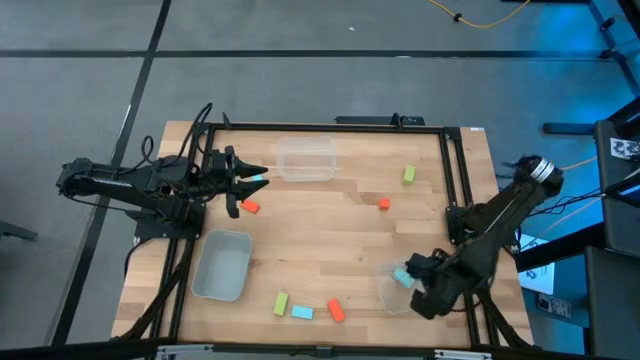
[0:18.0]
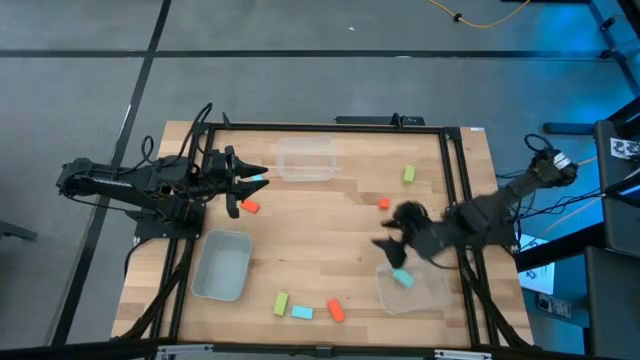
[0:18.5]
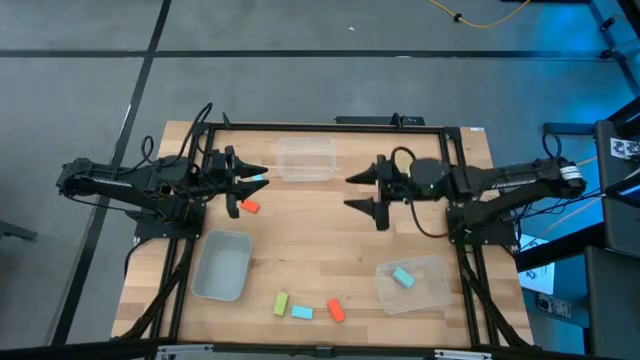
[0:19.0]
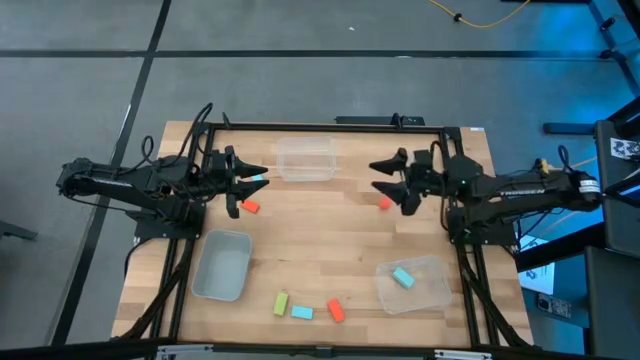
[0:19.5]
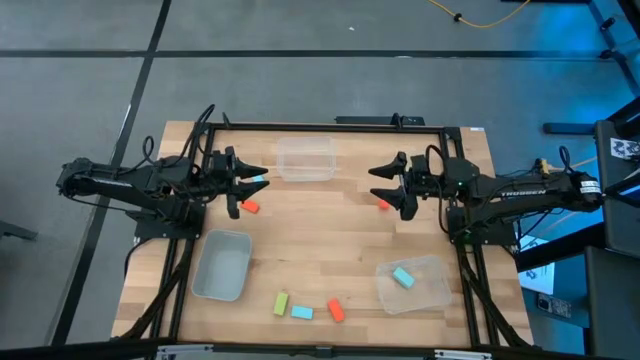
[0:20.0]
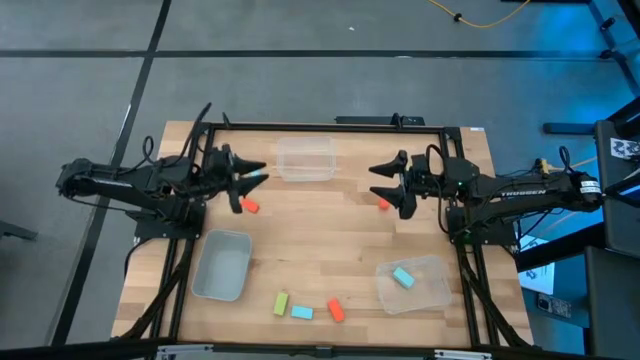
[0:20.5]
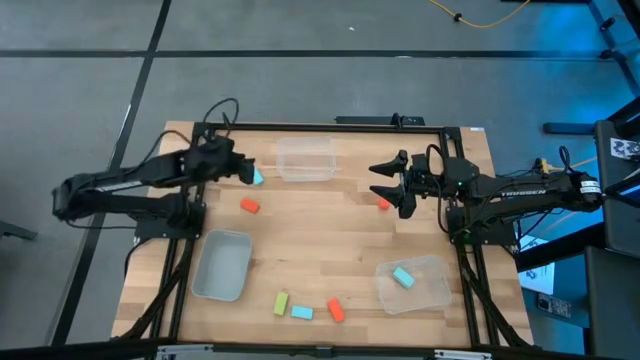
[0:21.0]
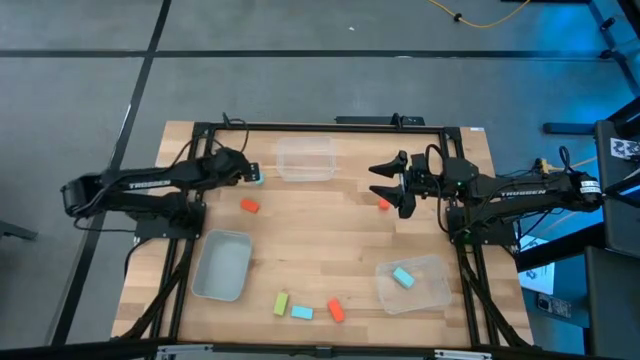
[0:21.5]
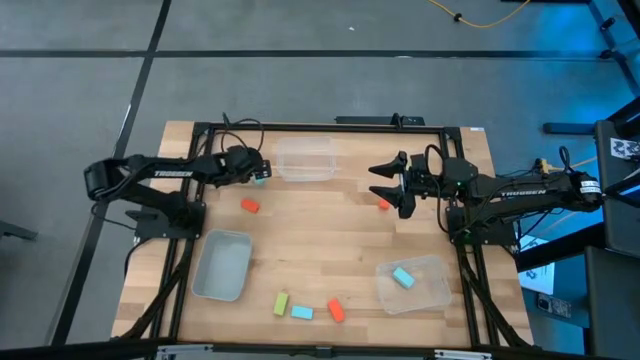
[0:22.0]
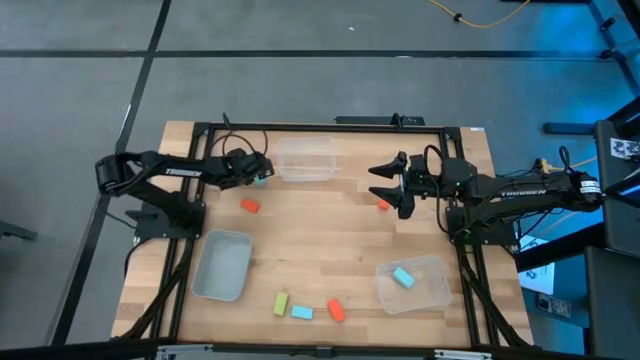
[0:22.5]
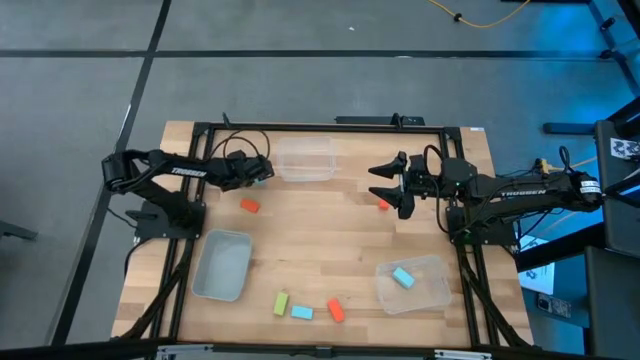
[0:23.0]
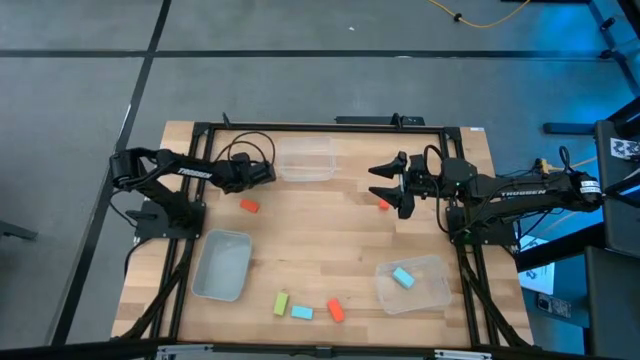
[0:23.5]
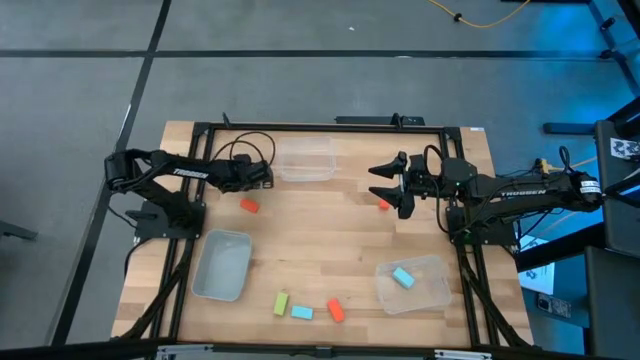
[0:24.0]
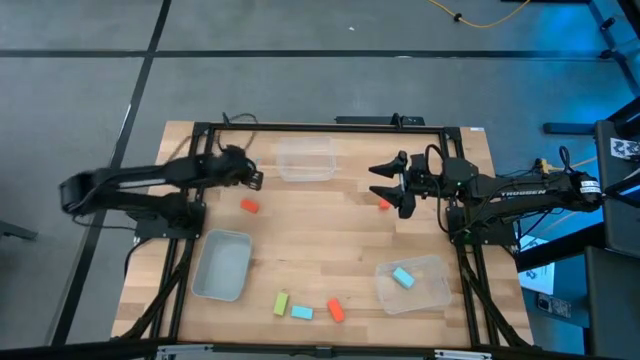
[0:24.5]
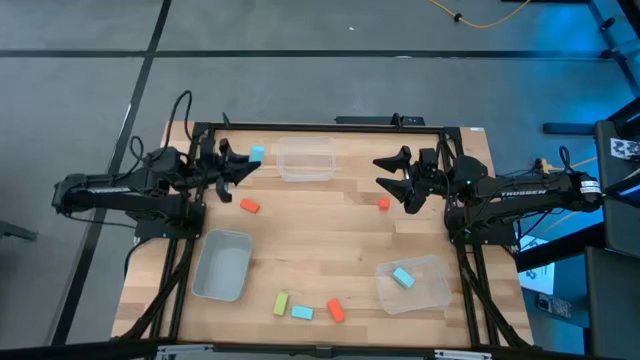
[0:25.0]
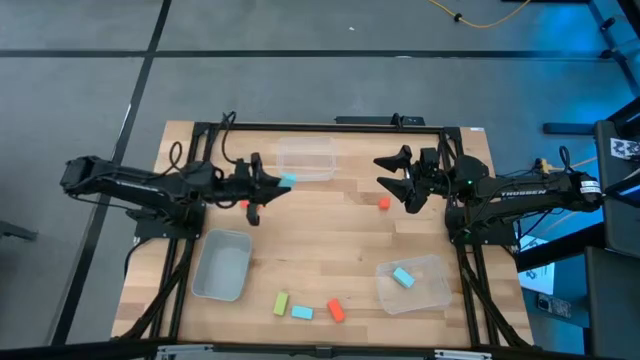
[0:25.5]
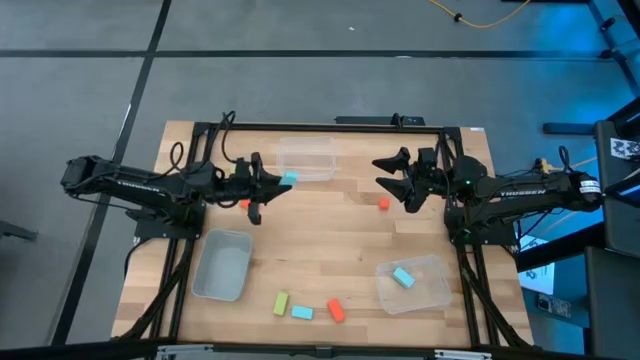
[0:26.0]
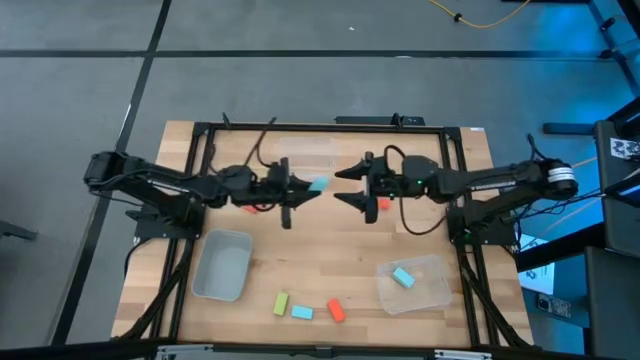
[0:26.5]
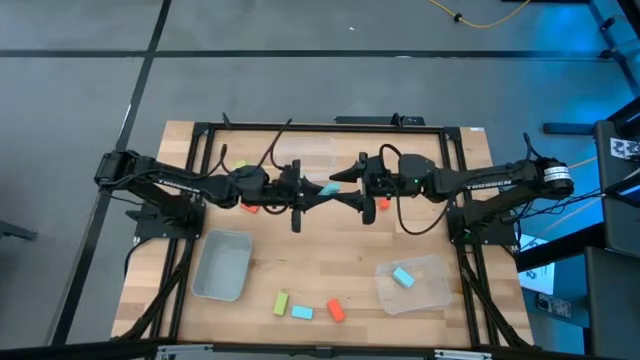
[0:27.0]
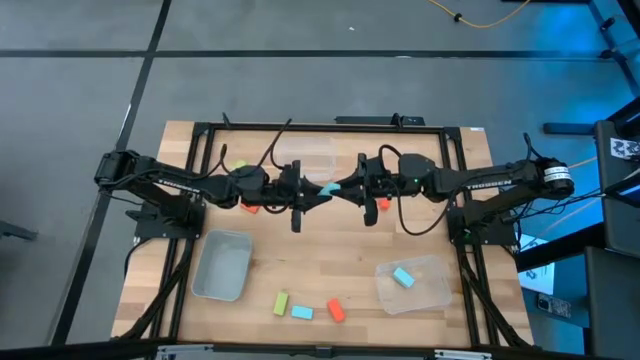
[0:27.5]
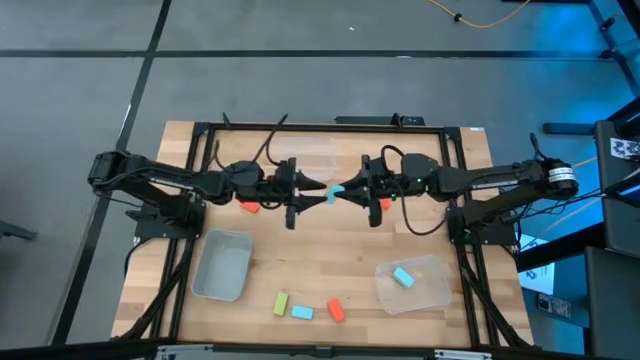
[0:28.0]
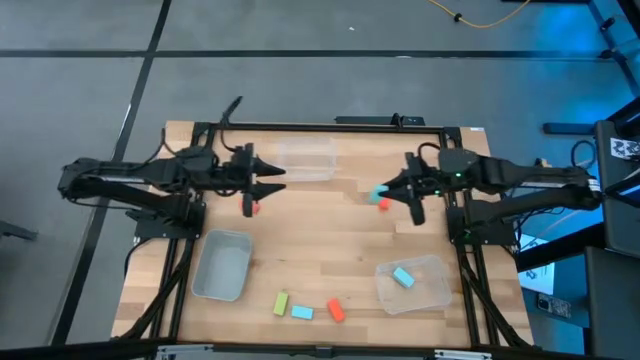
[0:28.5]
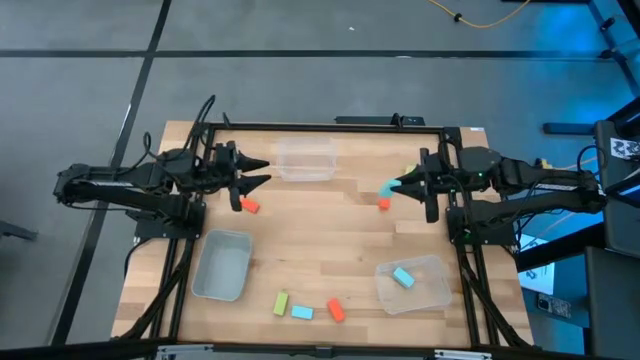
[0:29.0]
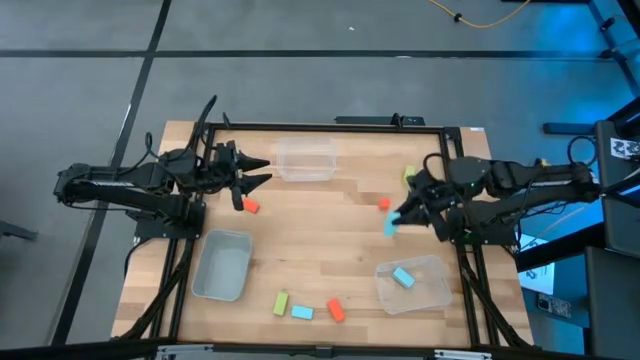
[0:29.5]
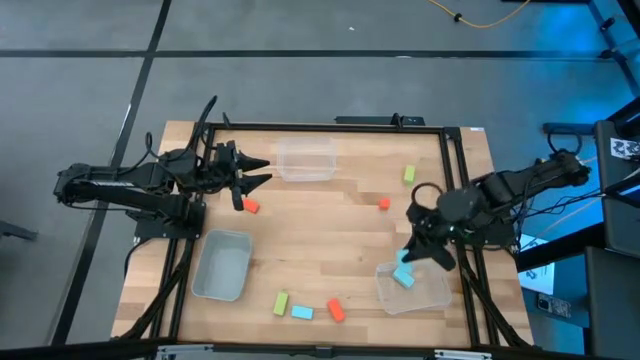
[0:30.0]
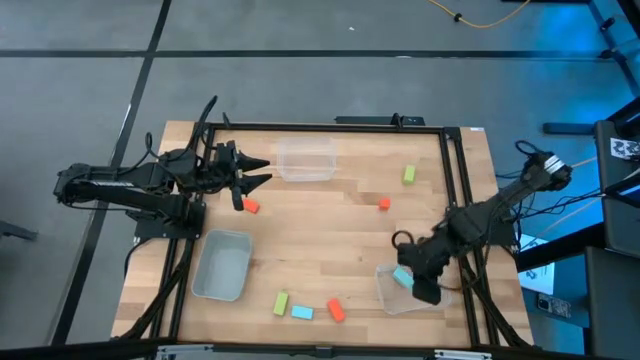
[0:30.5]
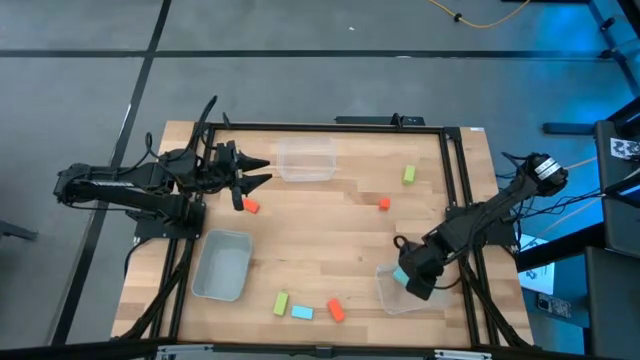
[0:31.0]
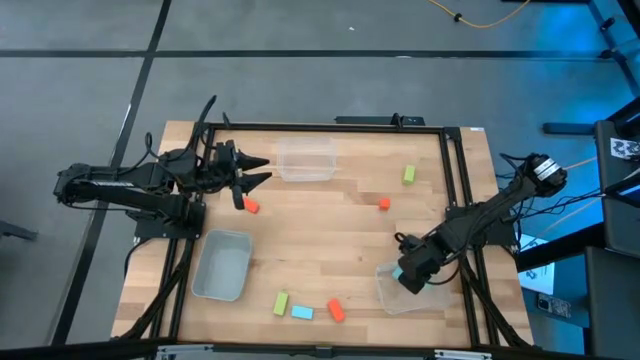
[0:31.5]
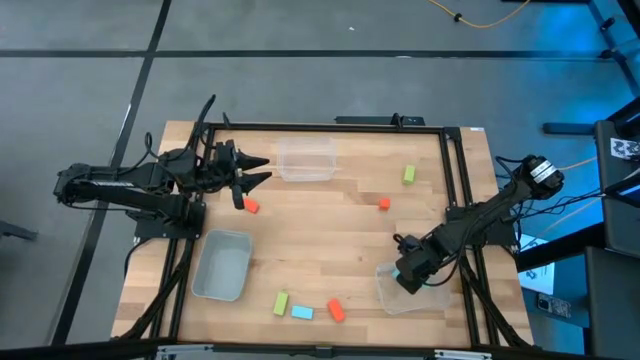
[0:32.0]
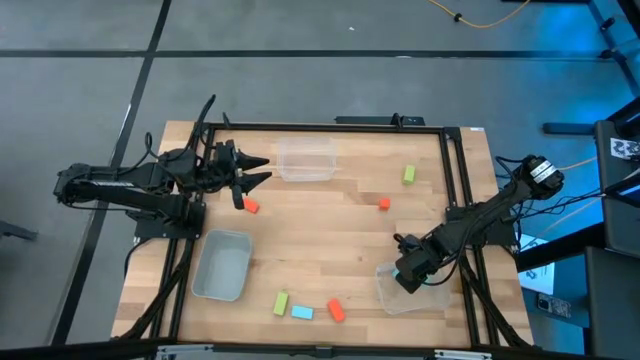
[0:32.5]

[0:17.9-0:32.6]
Task: Sort & place blocks by color
Put the top light blue half pillar block into the bottom right transparent bin

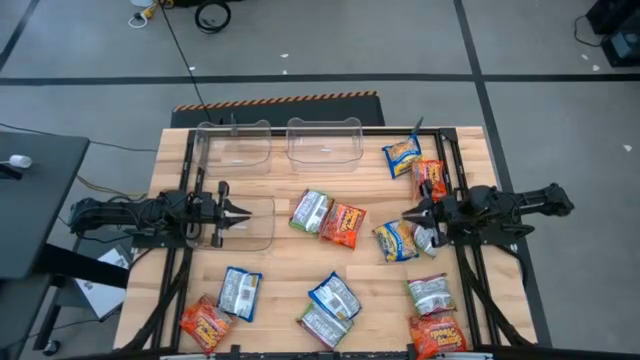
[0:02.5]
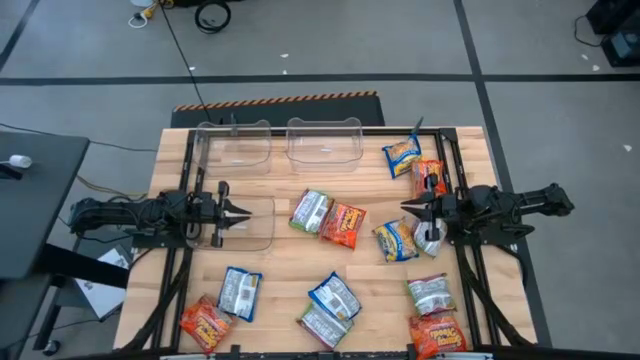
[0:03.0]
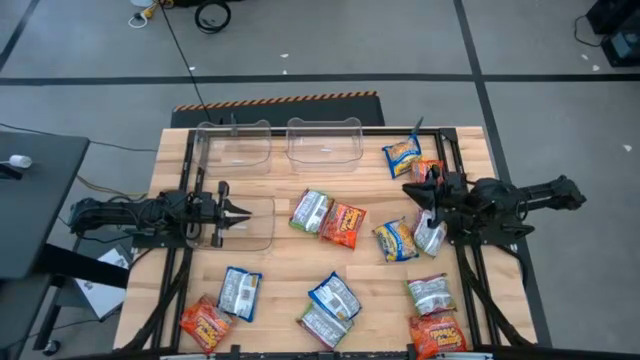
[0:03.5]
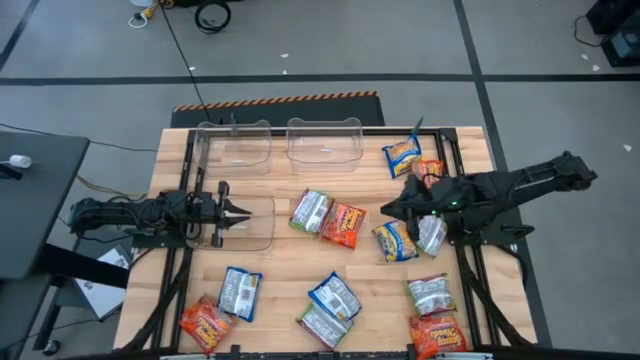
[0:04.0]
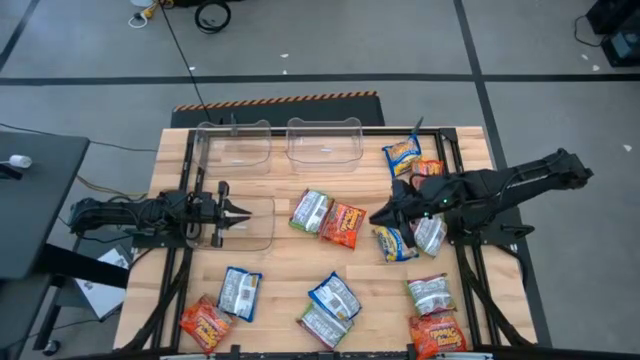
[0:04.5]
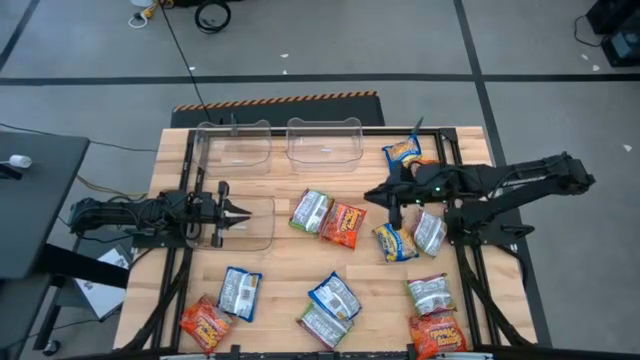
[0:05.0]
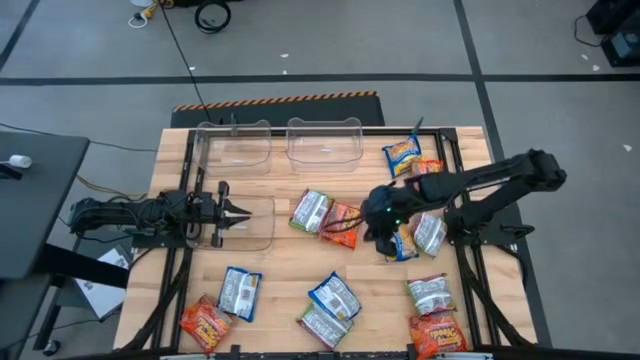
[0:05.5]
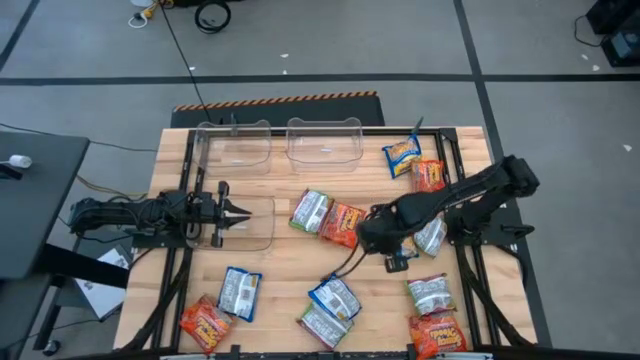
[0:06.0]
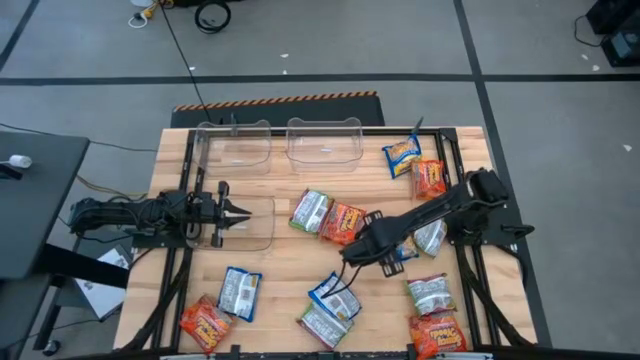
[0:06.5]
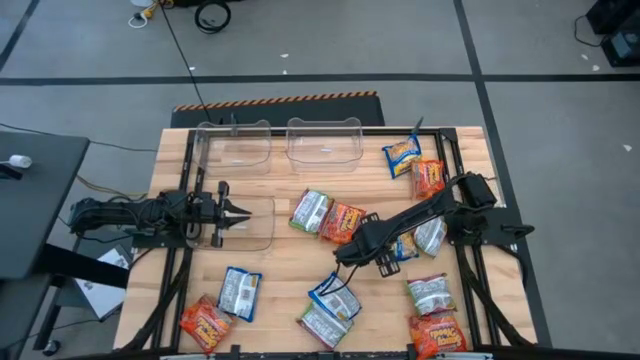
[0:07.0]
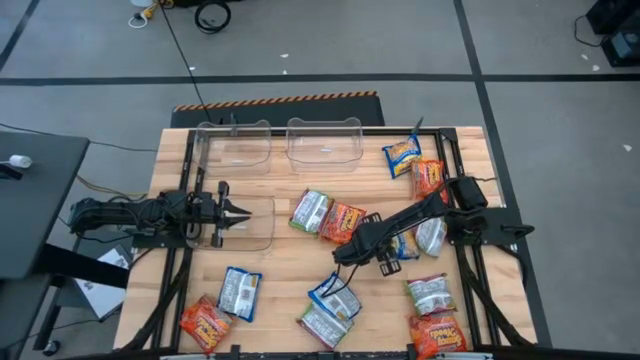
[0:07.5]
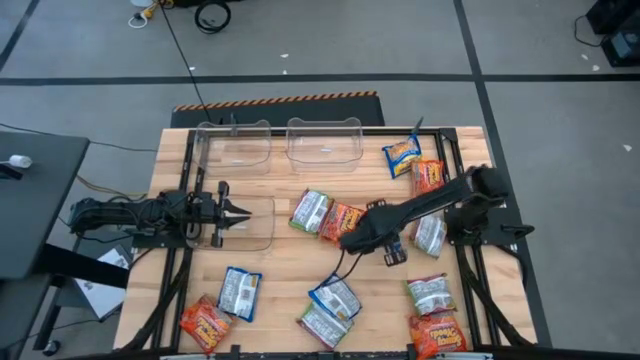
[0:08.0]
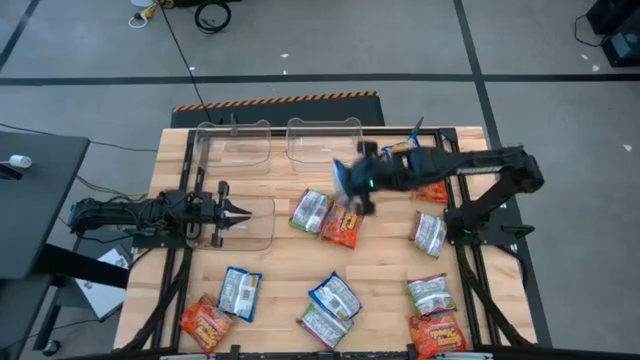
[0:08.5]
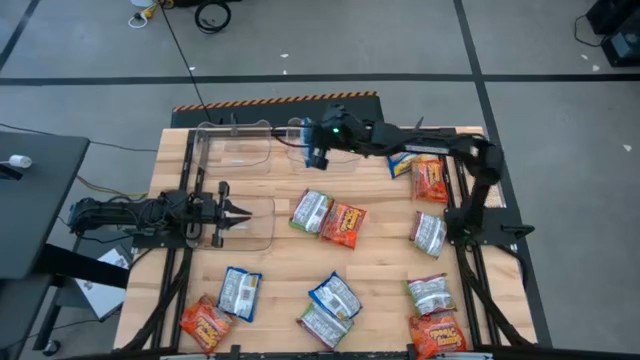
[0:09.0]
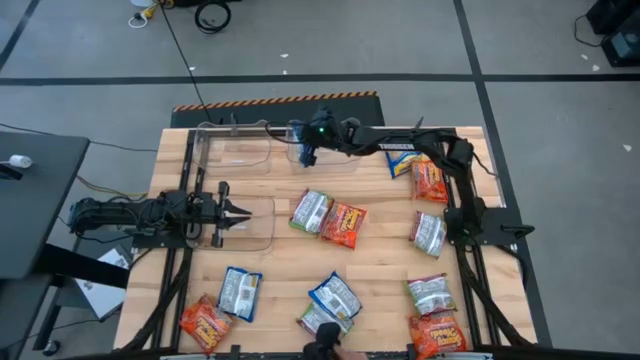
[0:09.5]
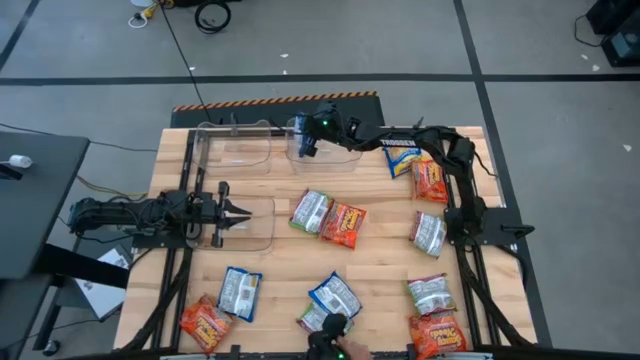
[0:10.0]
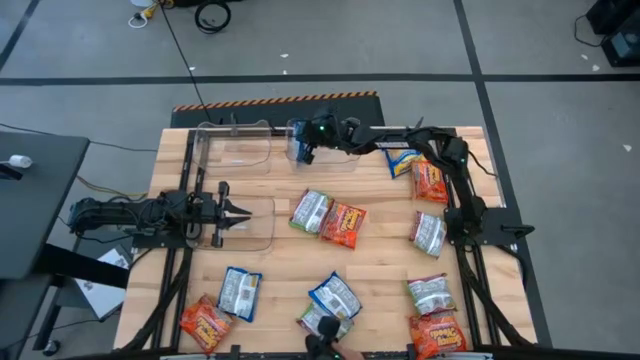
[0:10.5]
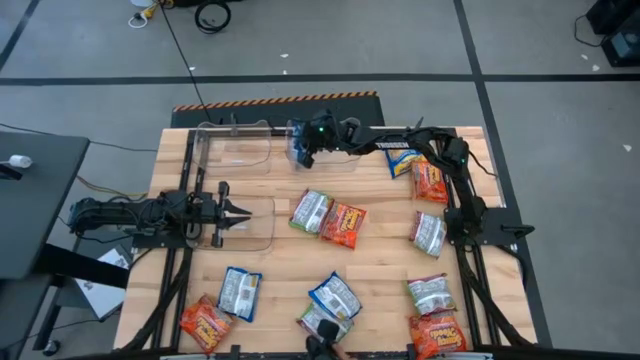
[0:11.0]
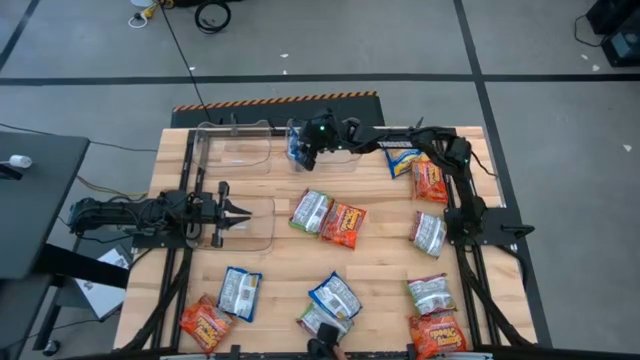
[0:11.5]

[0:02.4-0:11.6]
Task: Sort Maruchan noodles
Put the blue noodle pack into the right transparent bin
